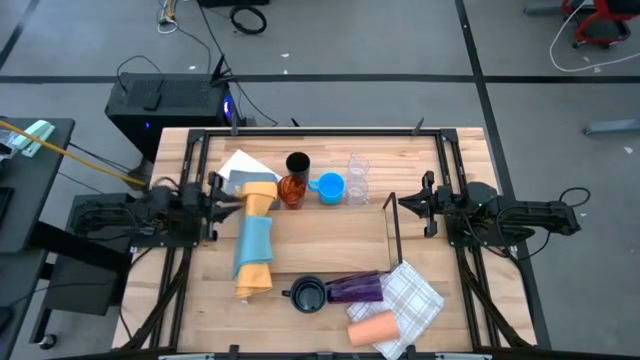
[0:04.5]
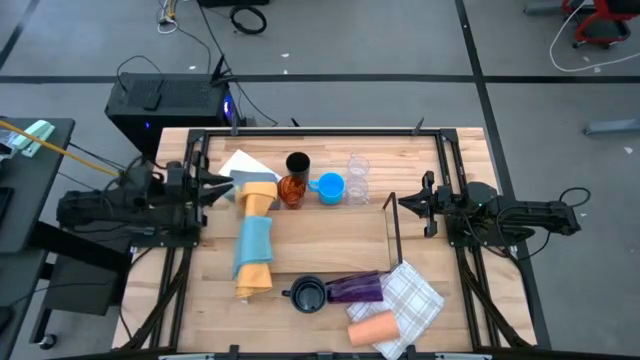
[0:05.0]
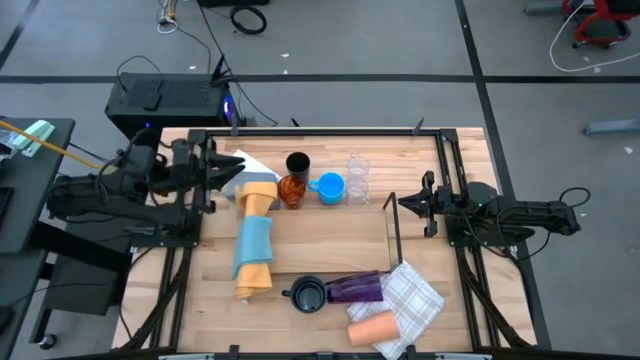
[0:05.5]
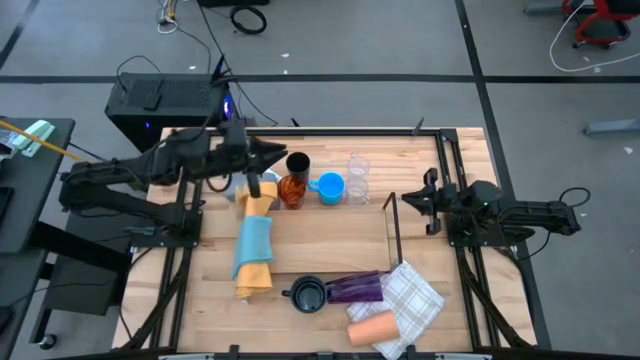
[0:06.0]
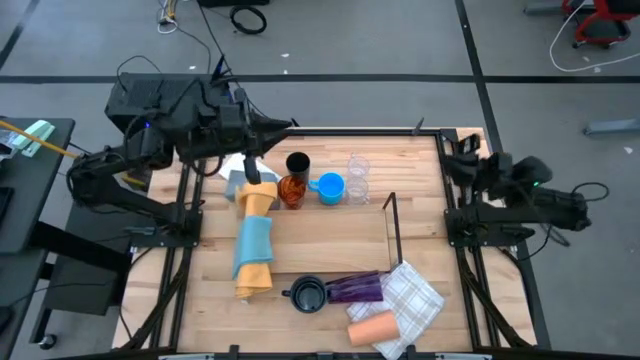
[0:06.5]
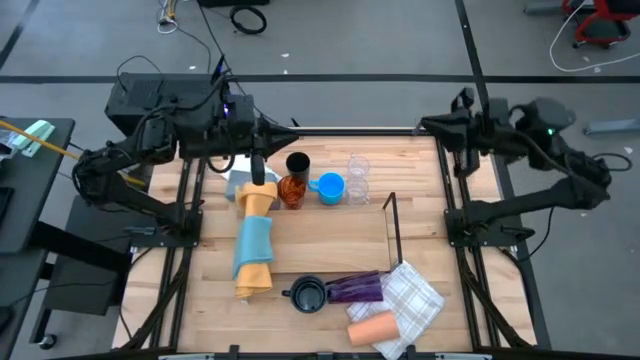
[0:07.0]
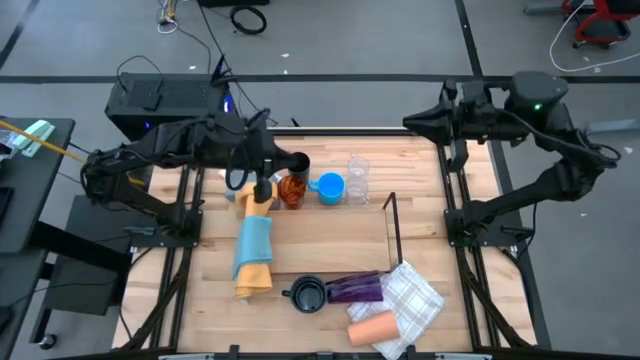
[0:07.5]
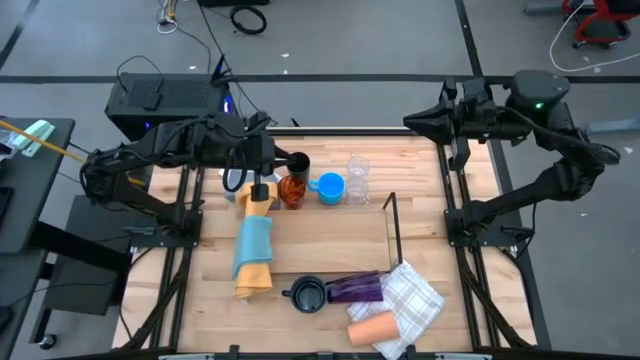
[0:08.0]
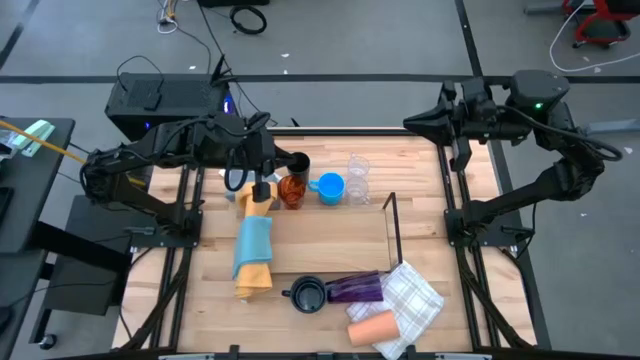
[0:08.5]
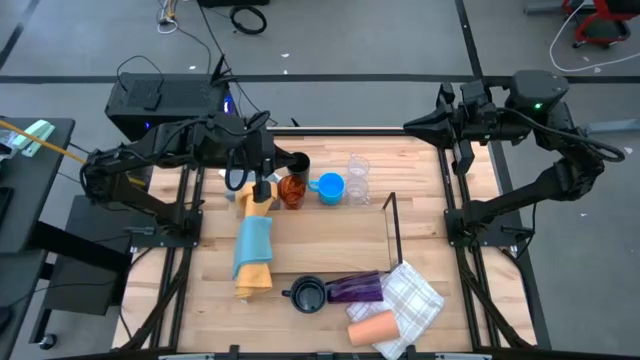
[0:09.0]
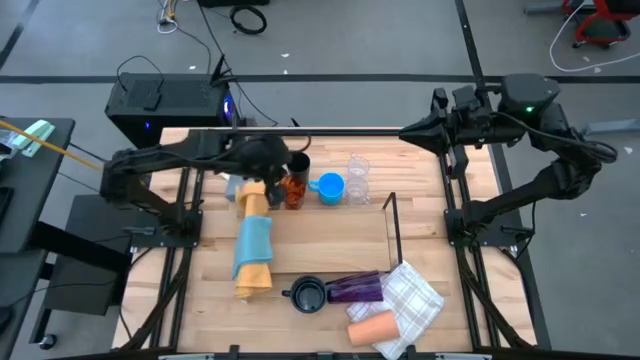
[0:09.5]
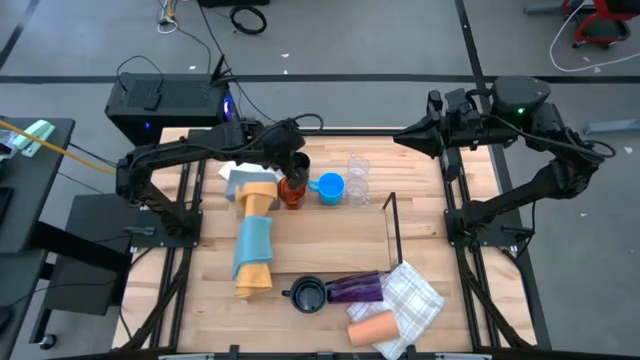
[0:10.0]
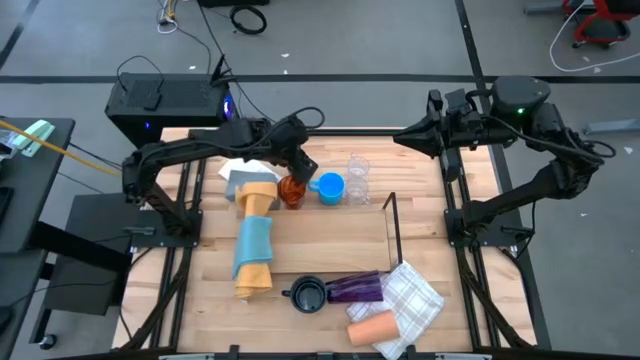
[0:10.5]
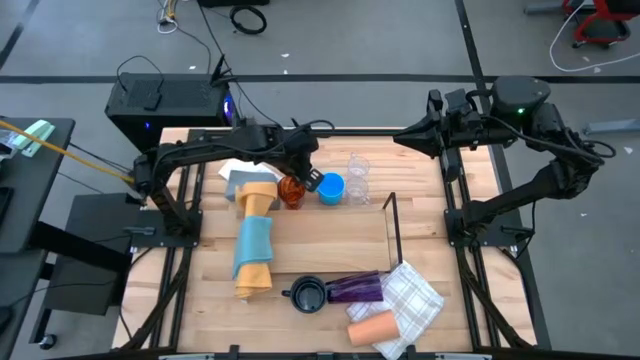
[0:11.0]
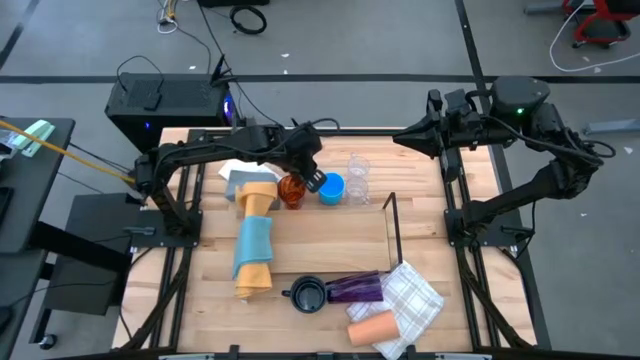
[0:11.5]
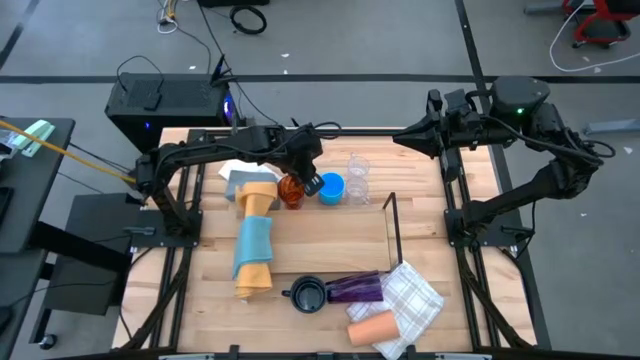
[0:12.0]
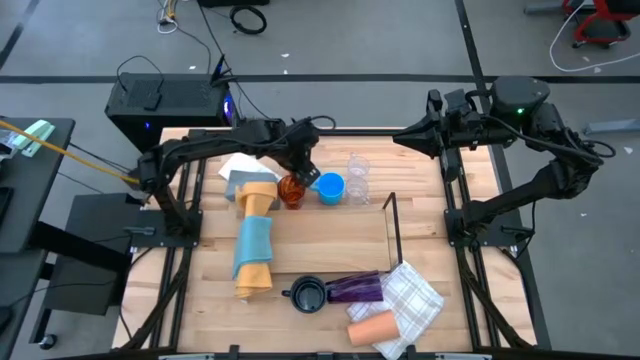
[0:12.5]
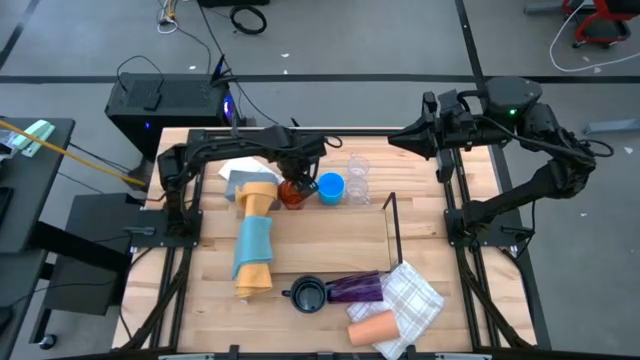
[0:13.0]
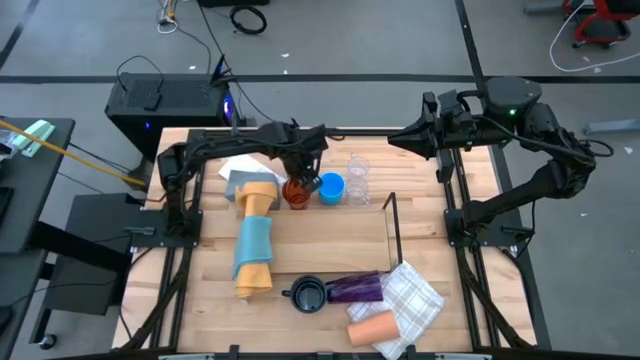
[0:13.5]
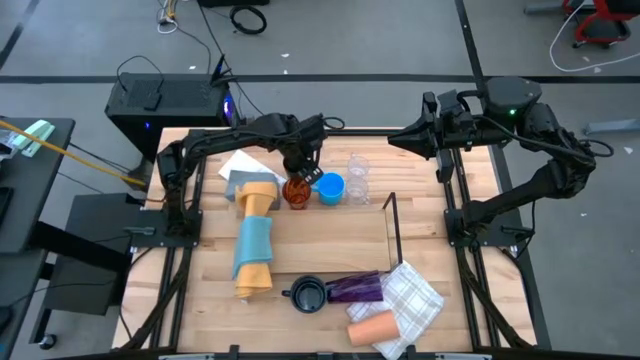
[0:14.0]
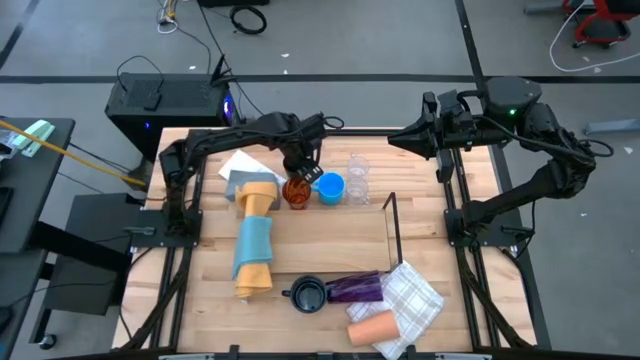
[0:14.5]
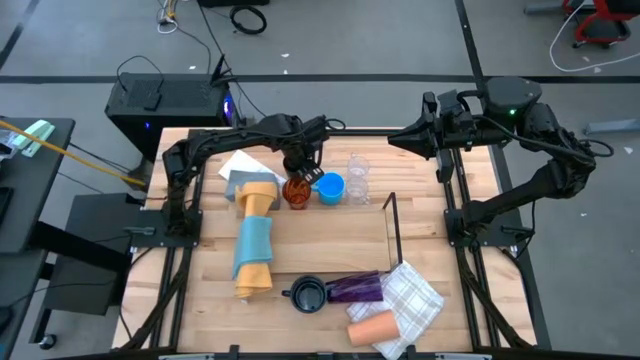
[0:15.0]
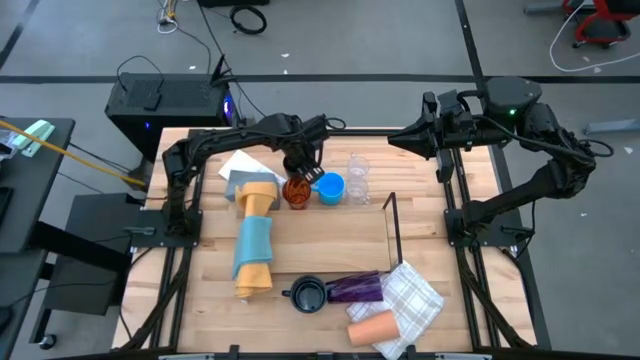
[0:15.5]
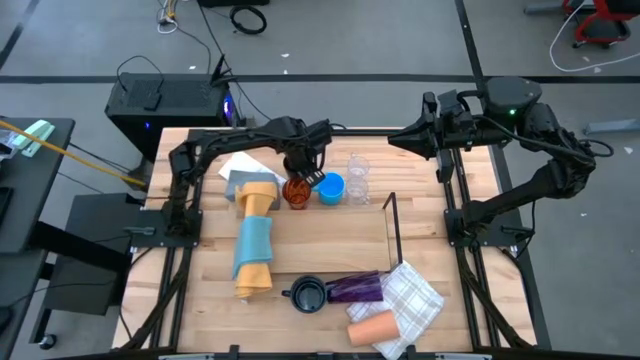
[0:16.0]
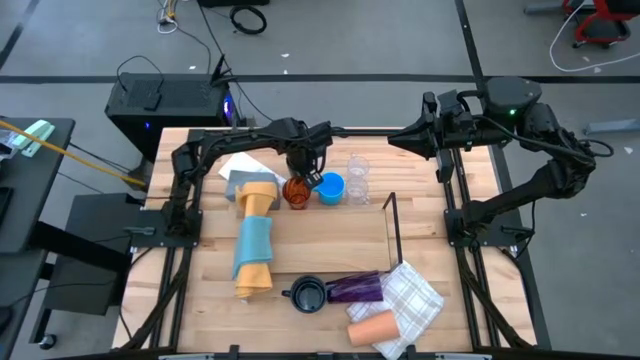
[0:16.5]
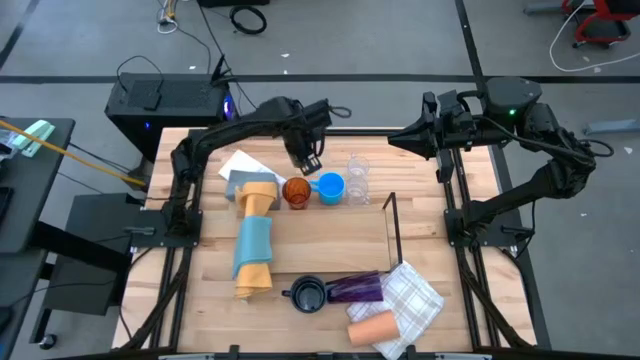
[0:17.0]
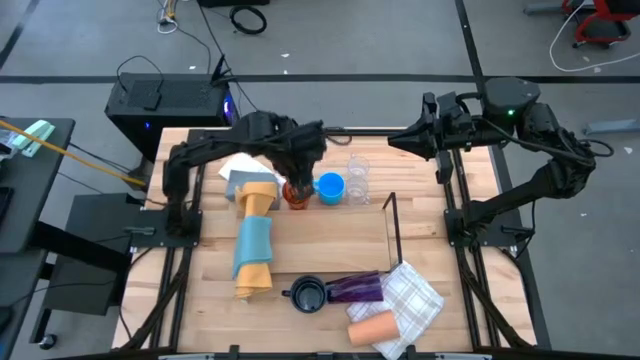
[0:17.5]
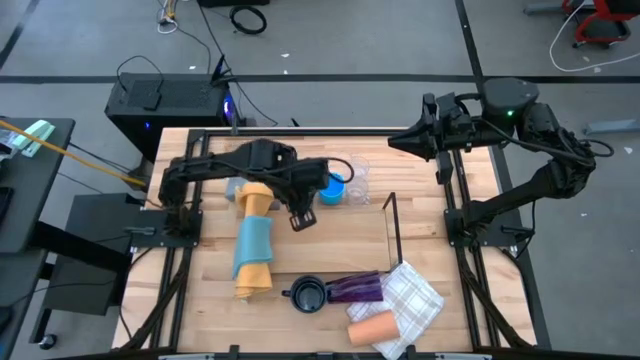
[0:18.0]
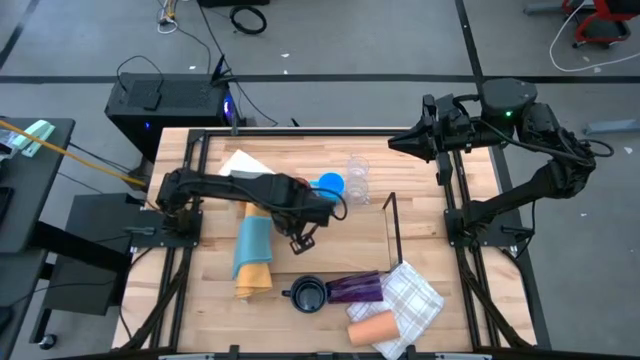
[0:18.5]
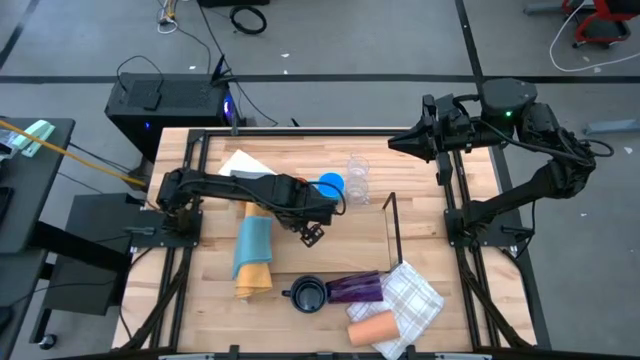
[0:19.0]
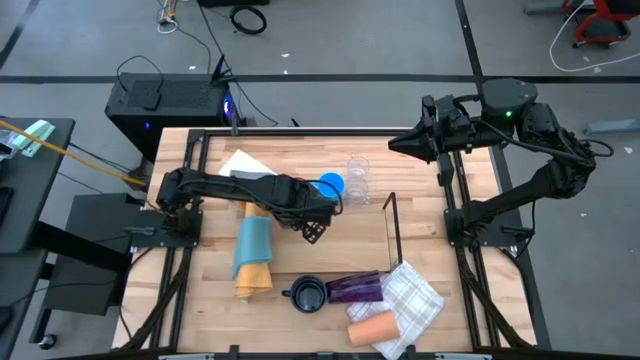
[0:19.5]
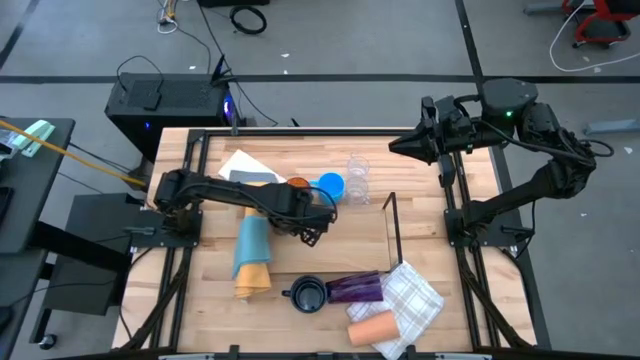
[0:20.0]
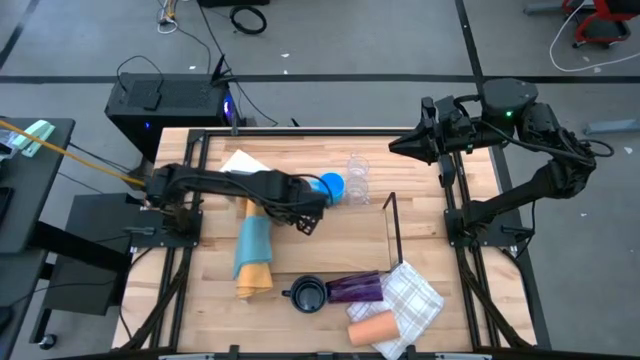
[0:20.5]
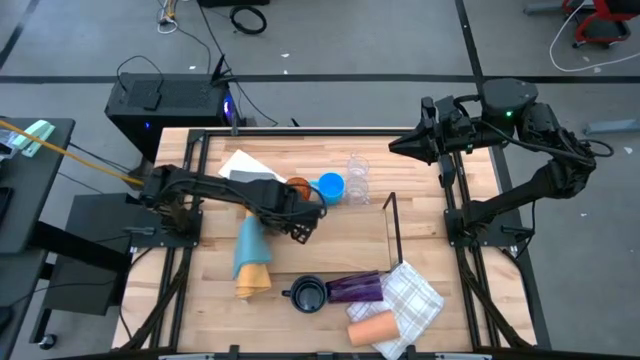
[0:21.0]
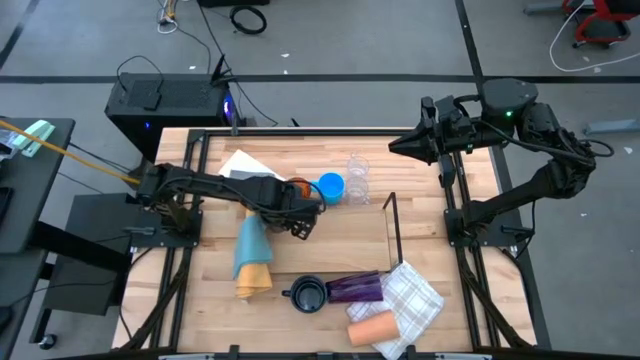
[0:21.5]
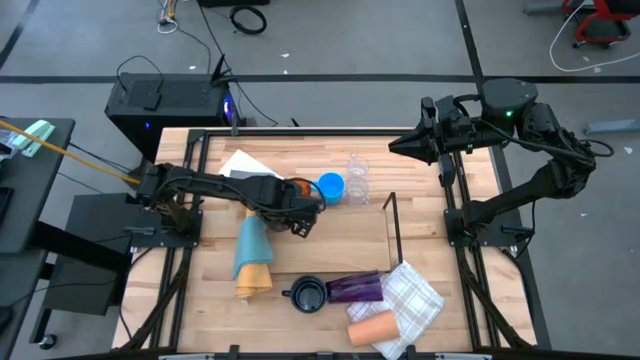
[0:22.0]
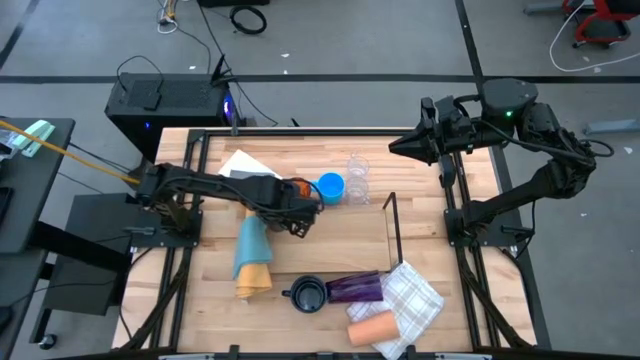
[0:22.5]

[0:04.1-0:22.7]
Task: Stack small to large cups/mugs on shelf
Put the black cup on the shelf

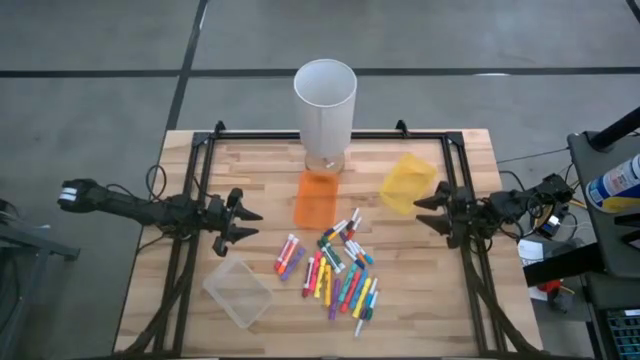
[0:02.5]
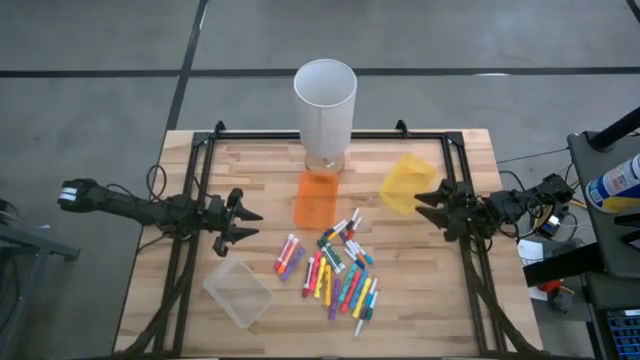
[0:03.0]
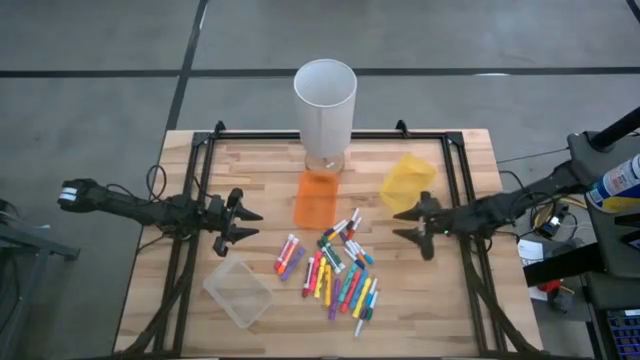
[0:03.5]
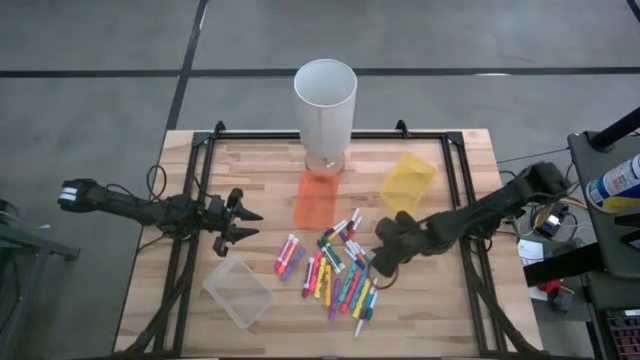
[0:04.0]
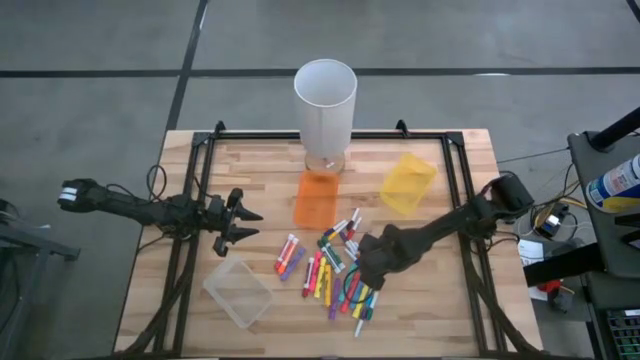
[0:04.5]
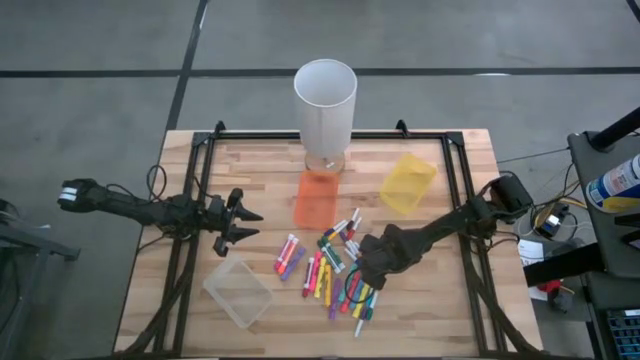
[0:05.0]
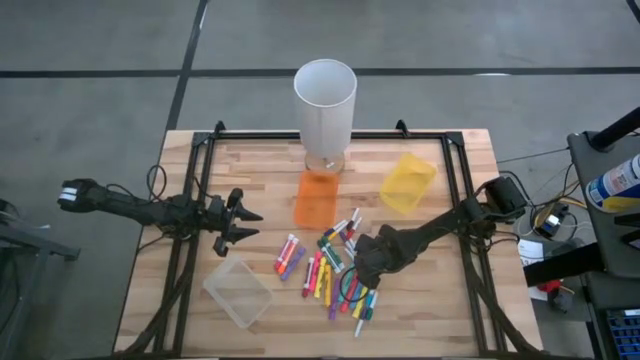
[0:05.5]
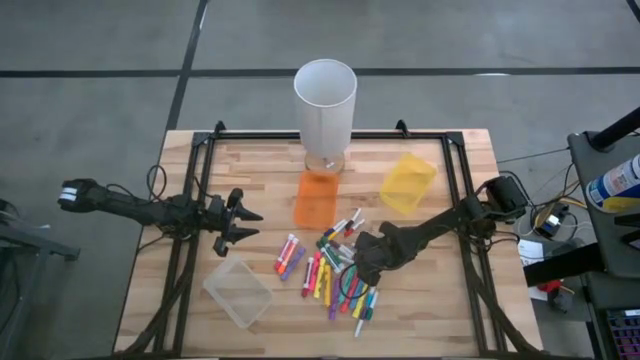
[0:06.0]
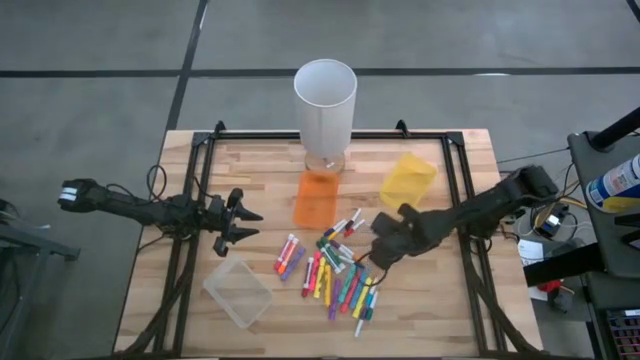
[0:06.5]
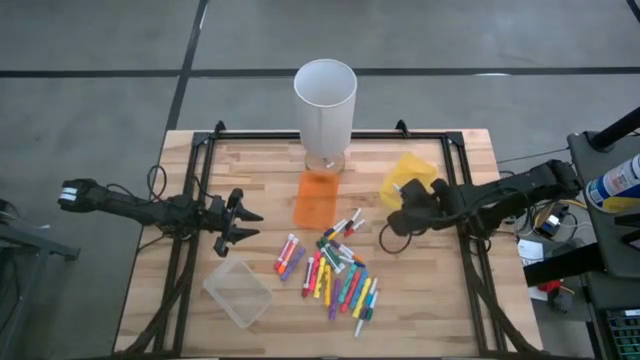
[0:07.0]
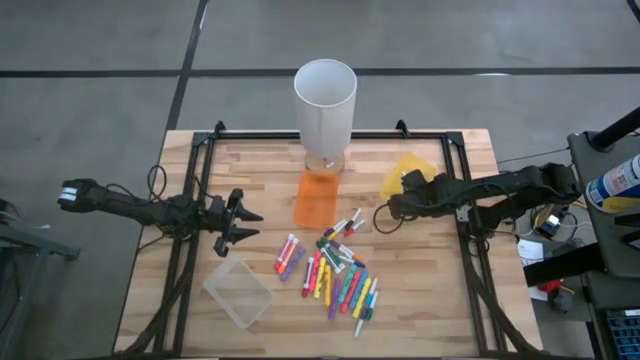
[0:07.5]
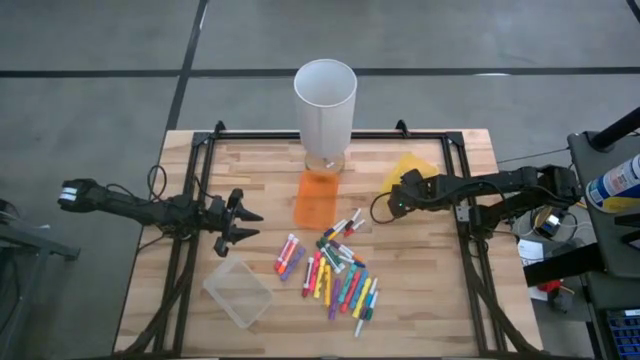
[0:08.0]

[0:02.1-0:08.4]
Task: Pick & Place Markers
Put the top small light blue marker pen into the yellow bin
